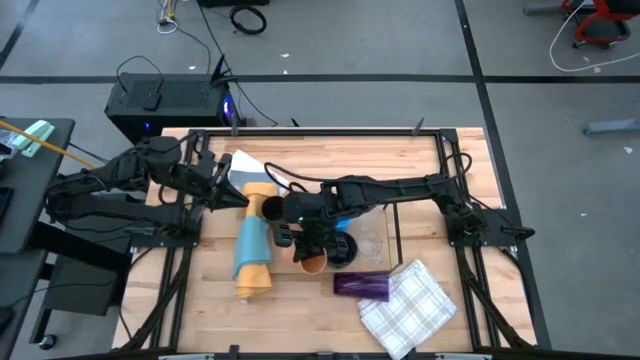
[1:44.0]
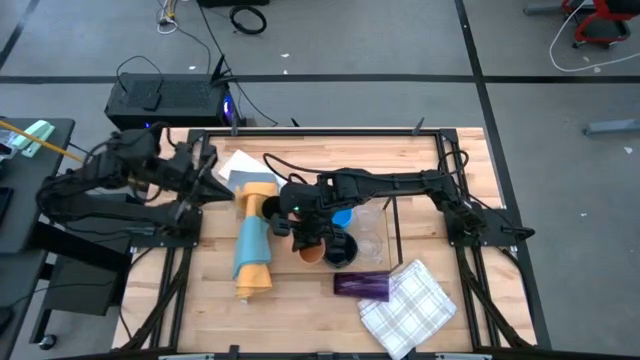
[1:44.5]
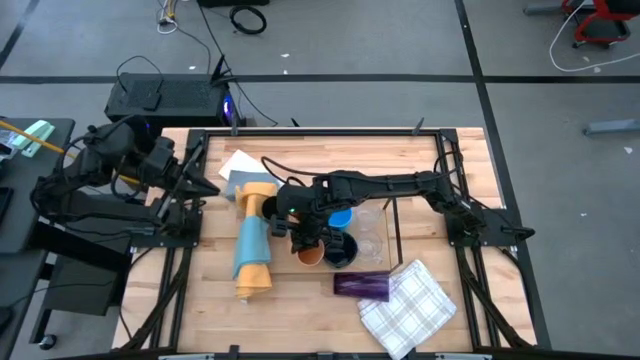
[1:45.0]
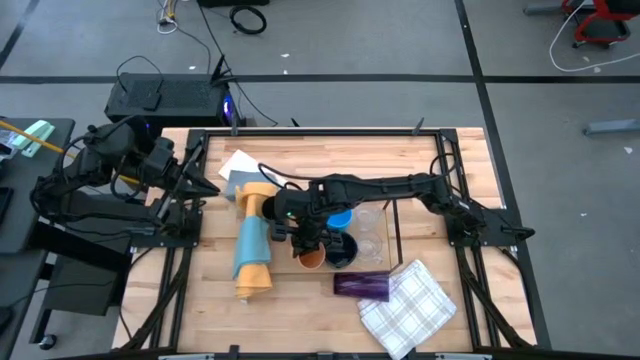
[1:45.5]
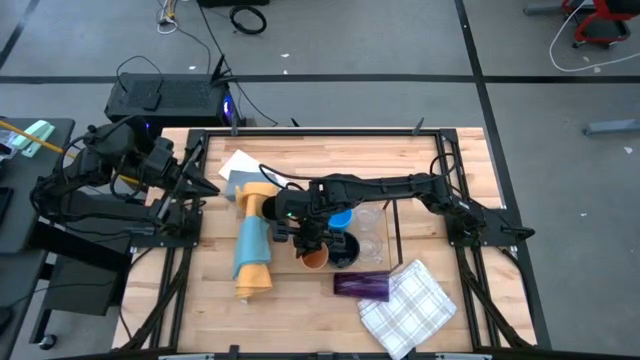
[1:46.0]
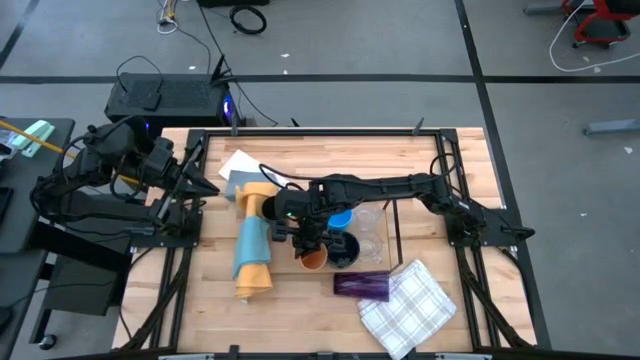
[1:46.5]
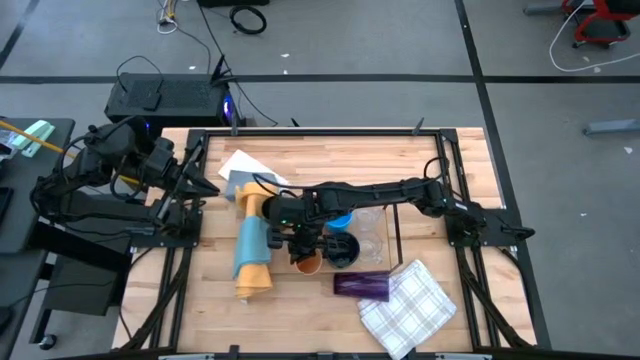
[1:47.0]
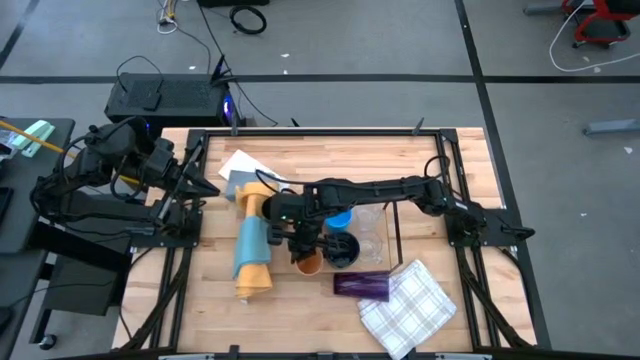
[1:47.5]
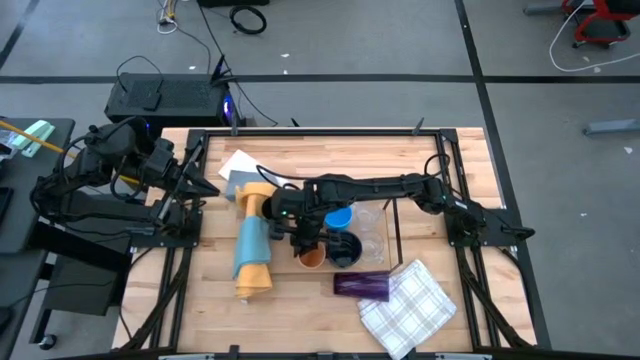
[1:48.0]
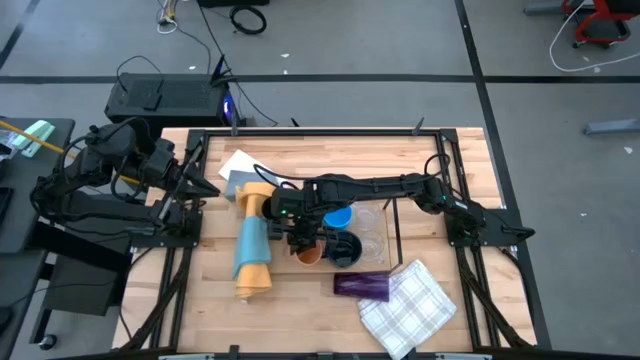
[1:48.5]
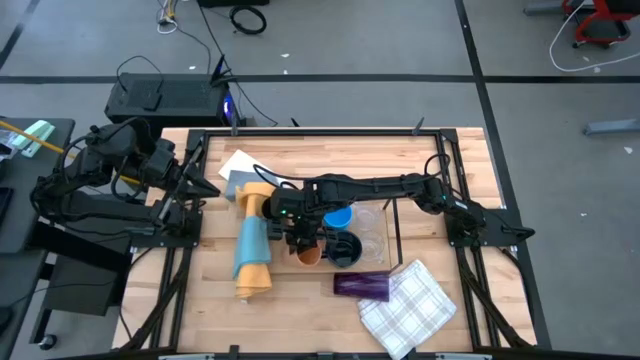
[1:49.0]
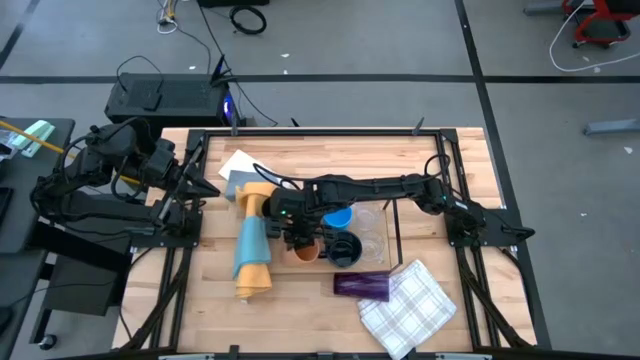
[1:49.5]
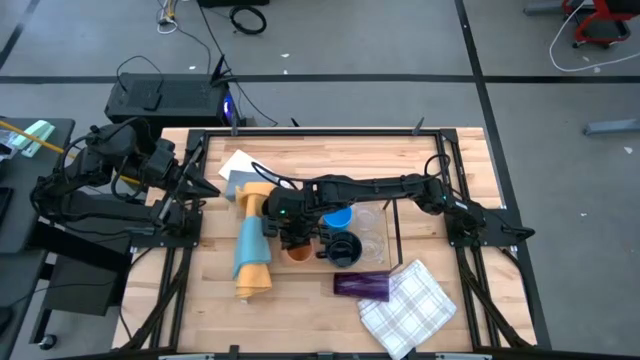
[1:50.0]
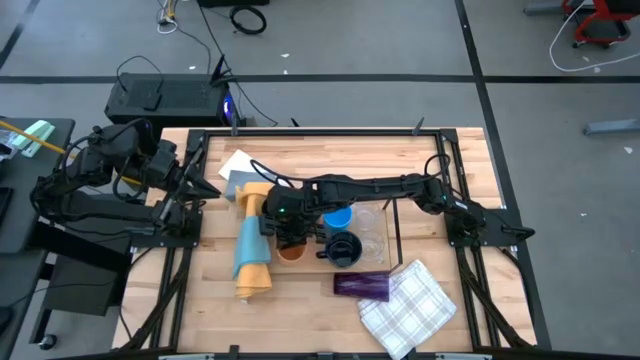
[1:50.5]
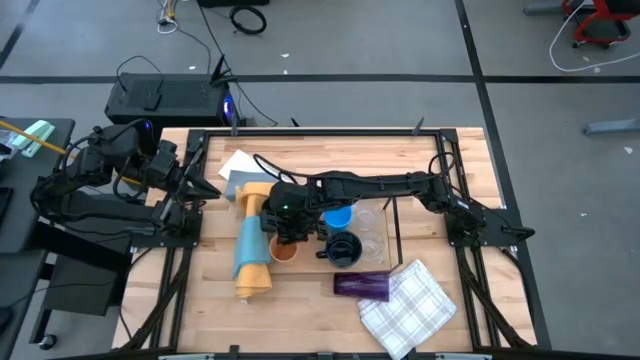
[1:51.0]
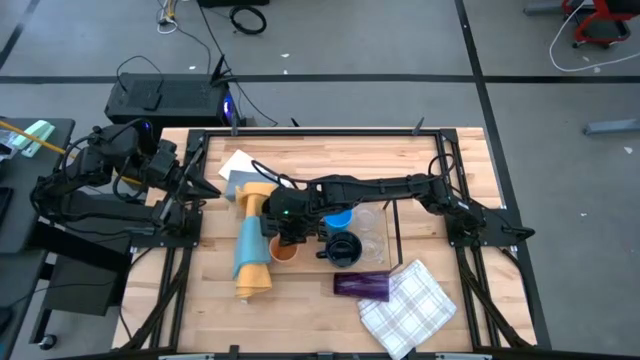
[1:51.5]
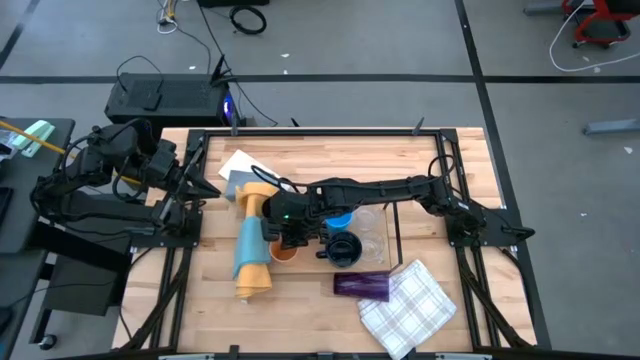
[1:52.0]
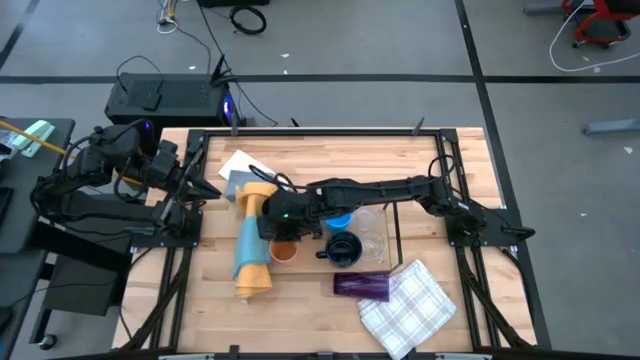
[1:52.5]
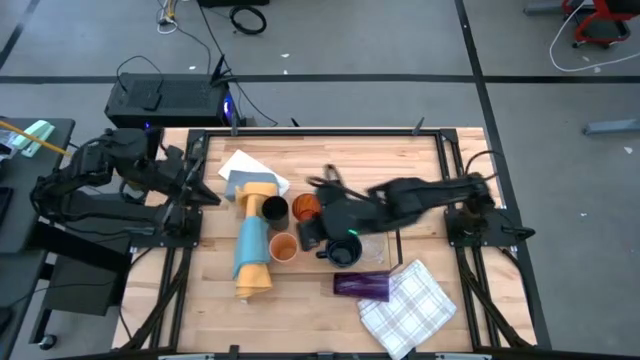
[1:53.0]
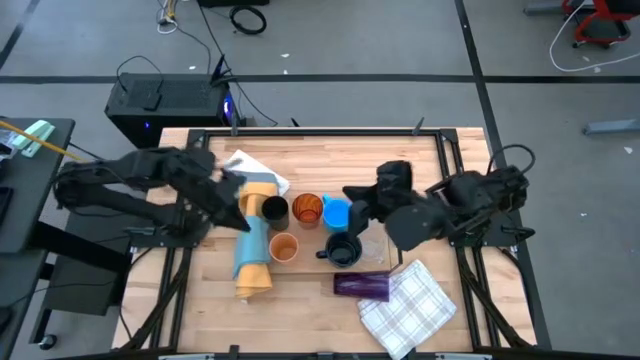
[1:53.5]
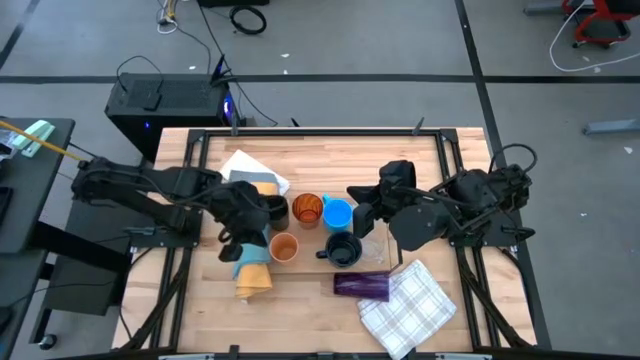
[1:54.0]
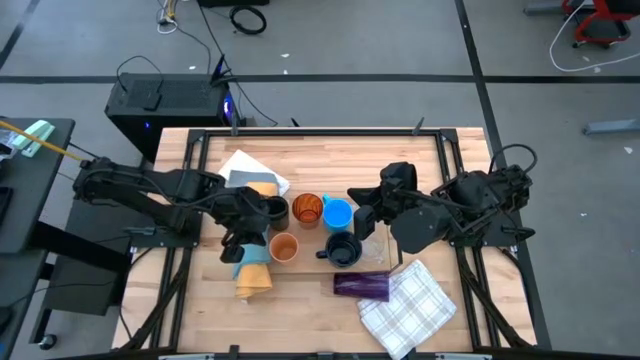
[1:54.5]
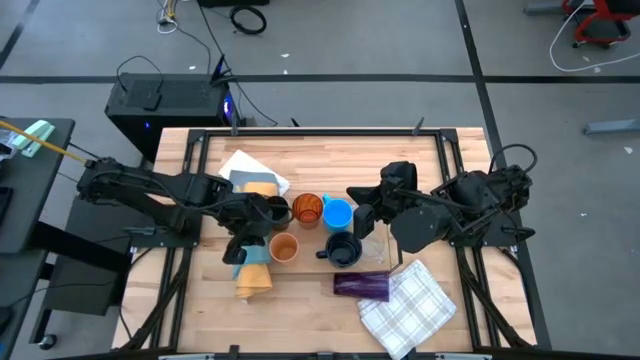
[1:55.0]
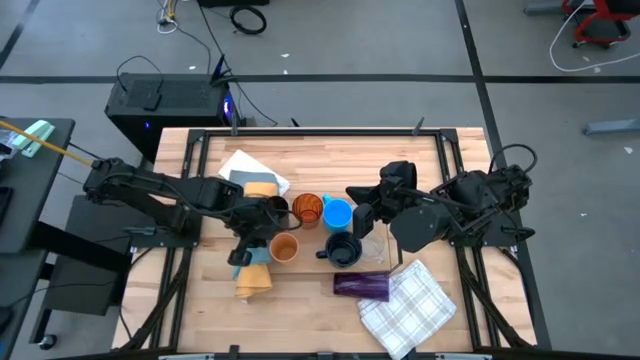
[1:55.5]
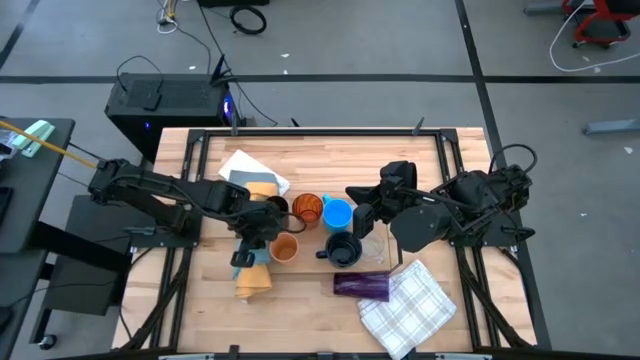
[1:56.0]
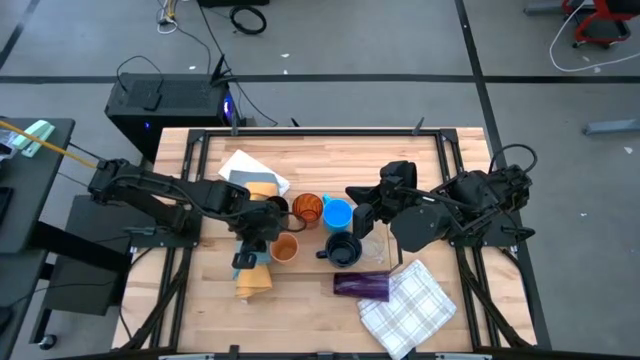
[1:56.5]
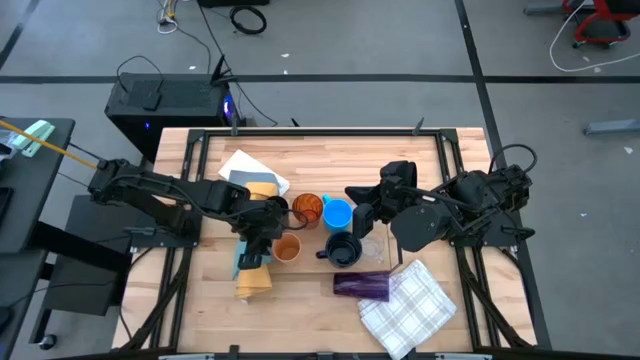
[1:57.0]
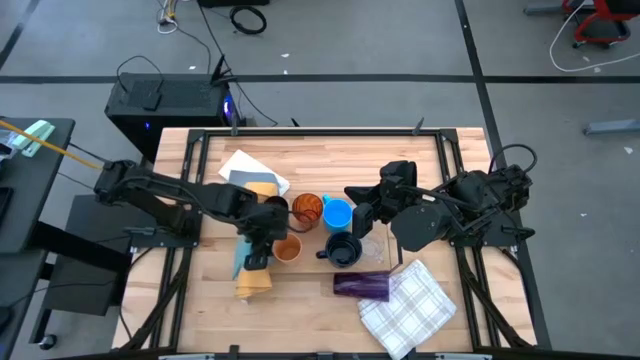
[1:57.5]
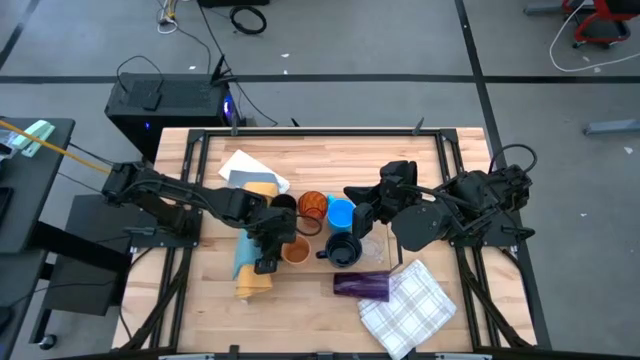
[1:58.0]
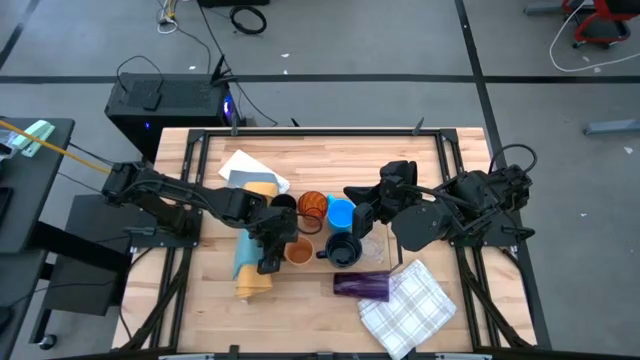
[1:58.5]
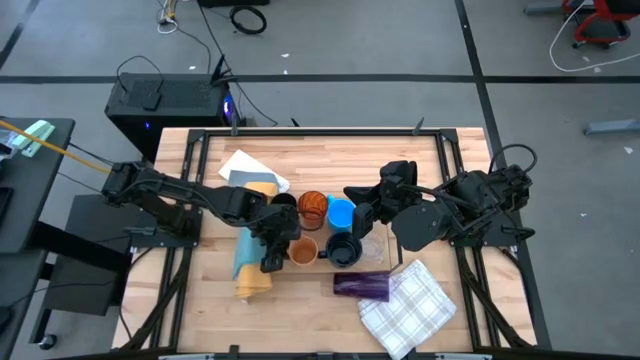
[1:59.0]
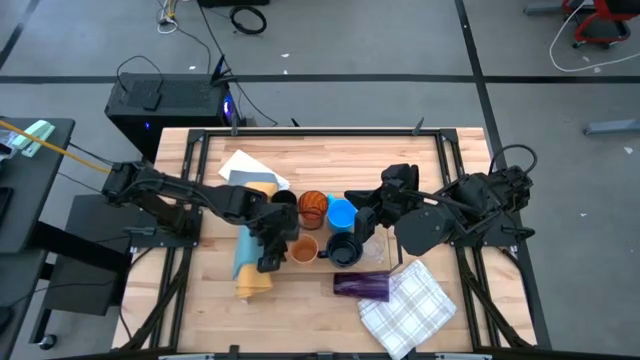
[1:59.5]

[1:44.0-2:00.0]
Task: Stack small to large cups/mugs on shelf
Put the light orange cup on the shelf

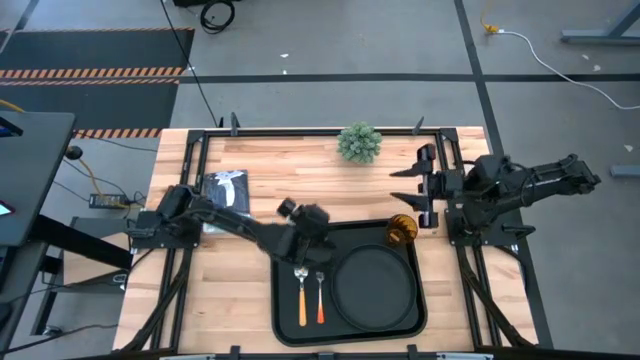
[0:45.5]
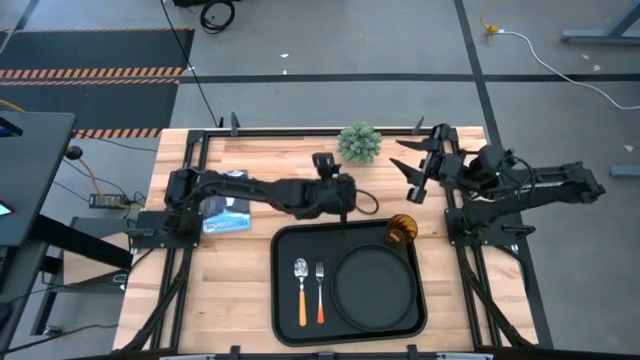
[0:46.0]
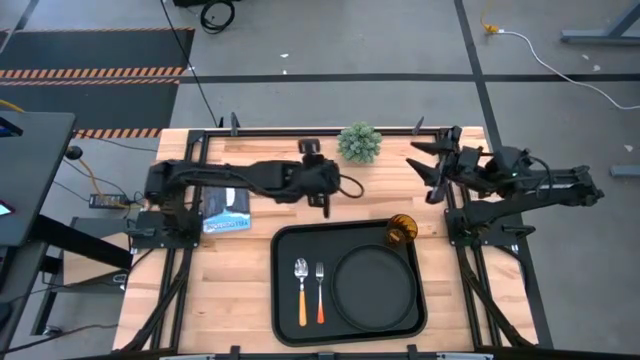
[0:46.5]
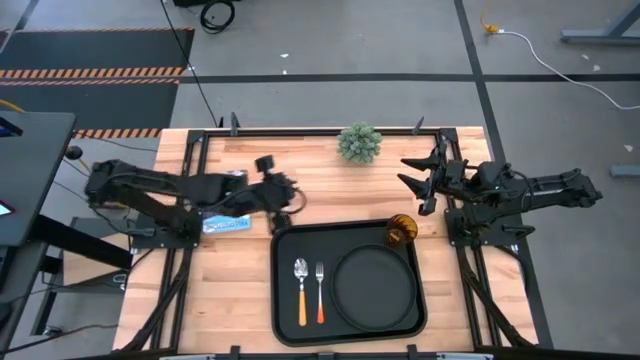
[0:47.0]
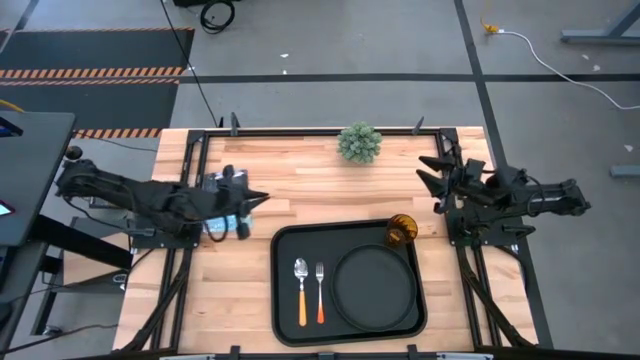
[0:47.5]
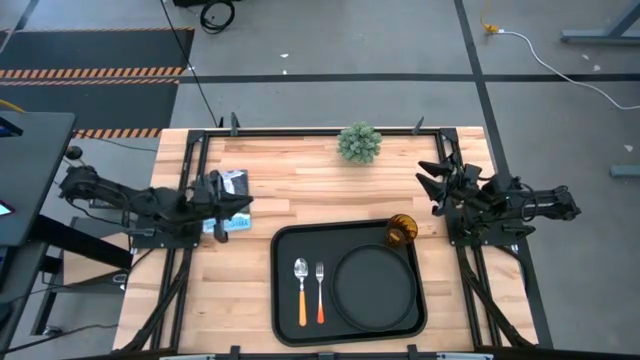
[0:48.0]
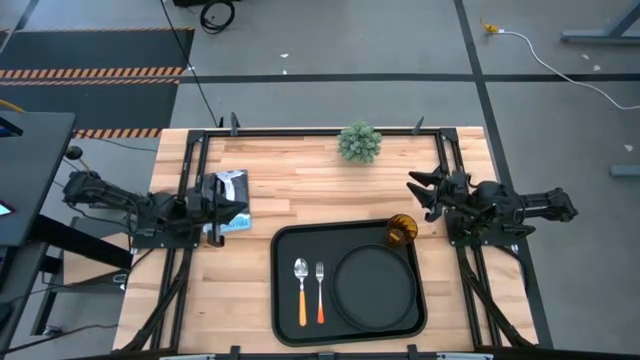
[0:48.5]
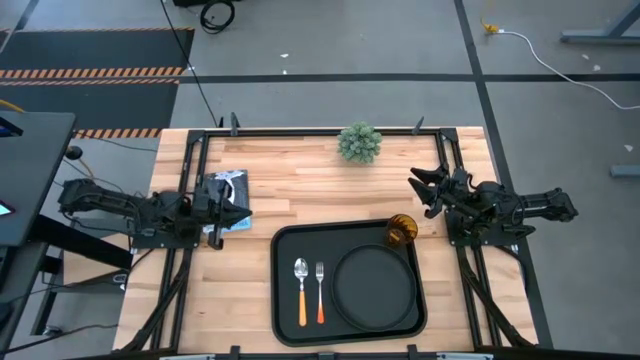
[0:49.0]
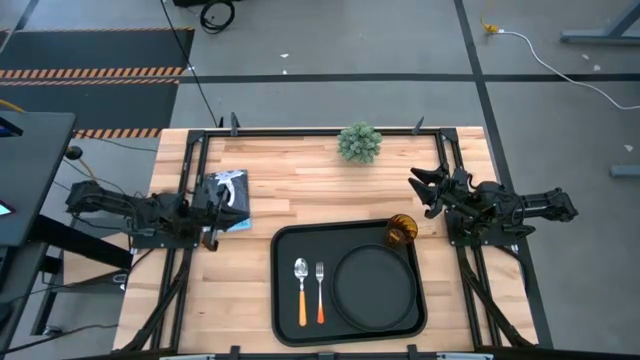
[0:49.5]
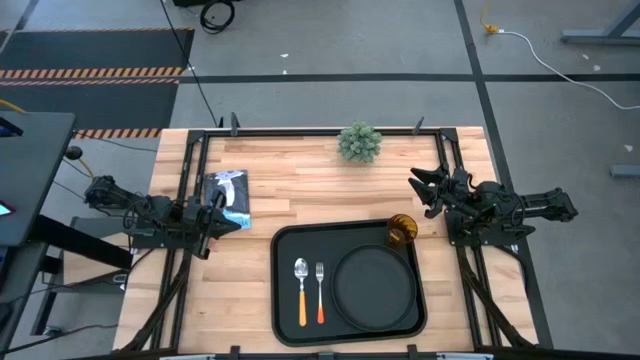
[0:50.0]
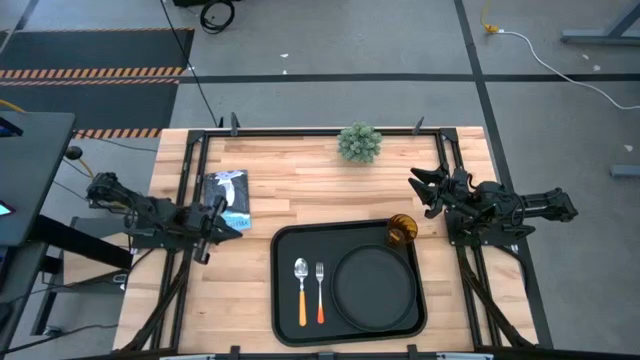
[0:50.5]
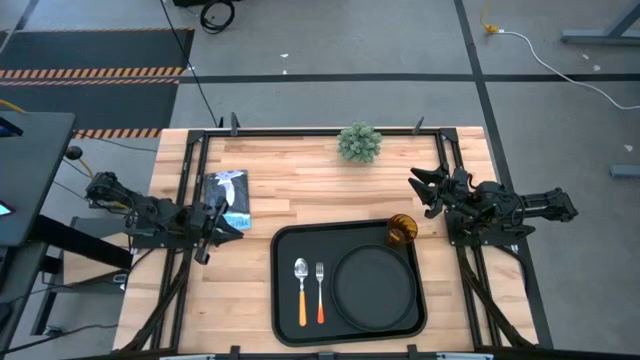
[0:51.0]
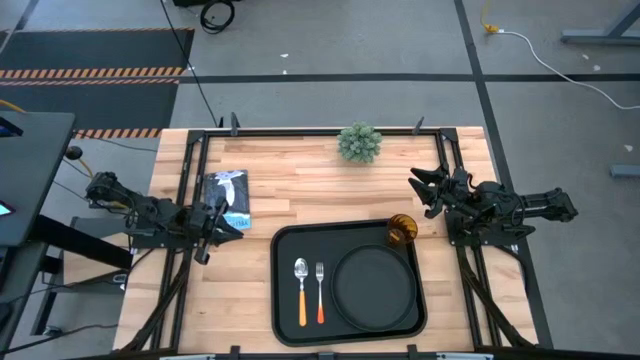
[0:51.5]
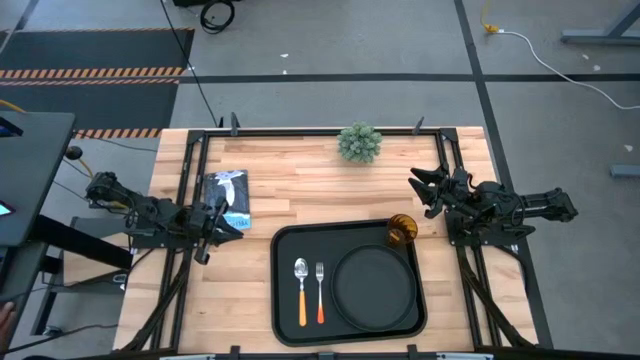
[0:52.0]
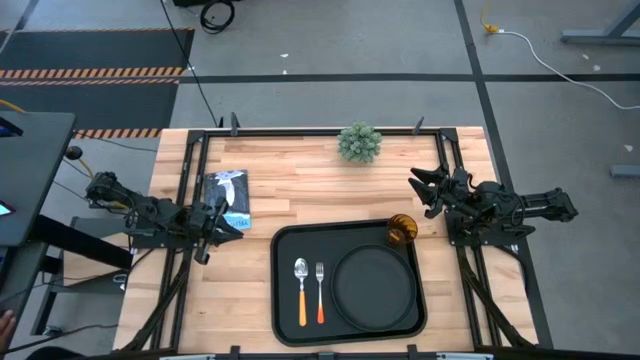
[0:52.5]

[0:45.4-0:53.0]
Task: Pick and place plate/cup/fork/spoon on tray
Return to Home Position
